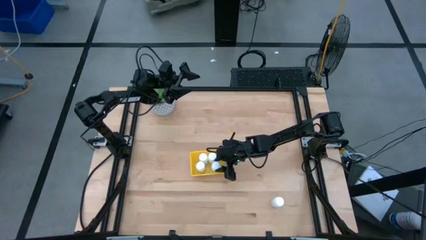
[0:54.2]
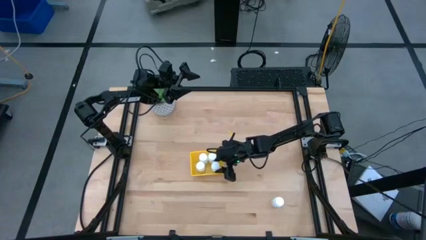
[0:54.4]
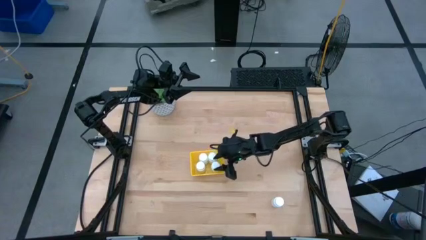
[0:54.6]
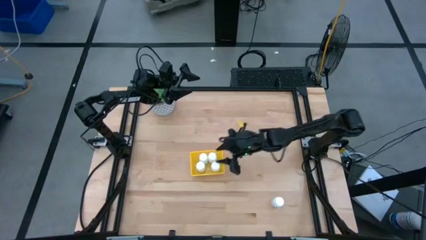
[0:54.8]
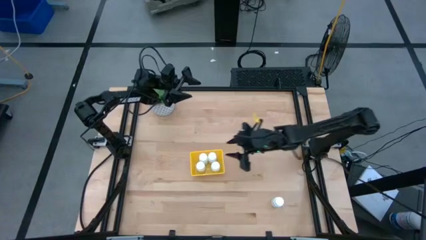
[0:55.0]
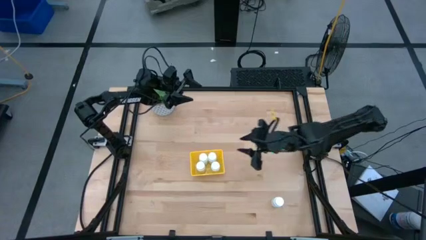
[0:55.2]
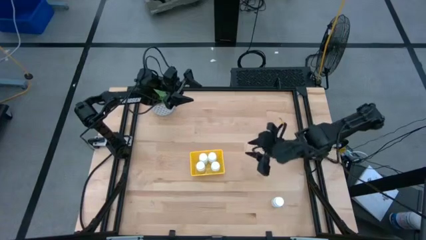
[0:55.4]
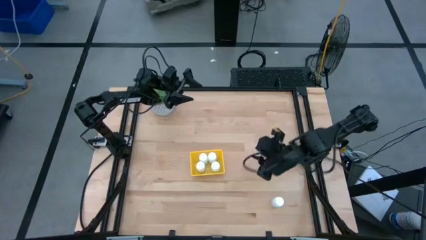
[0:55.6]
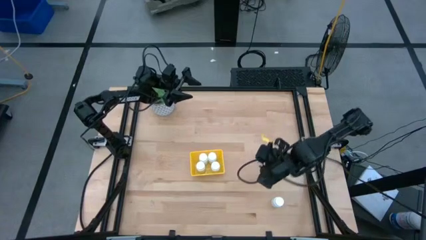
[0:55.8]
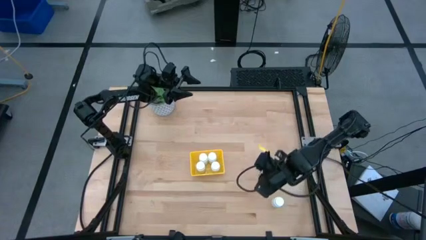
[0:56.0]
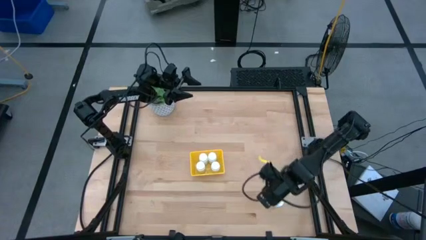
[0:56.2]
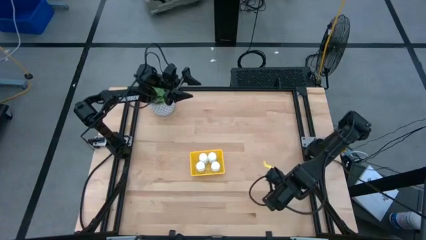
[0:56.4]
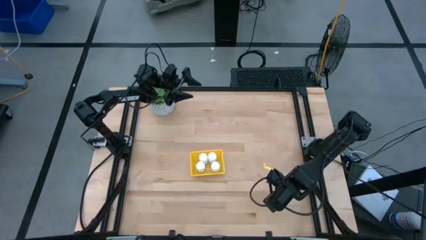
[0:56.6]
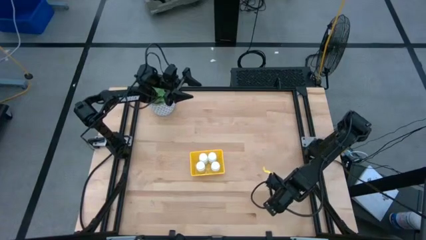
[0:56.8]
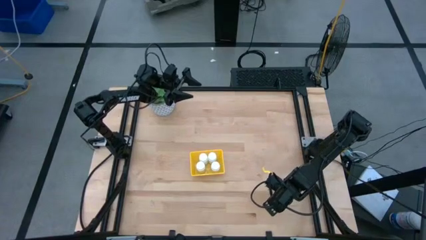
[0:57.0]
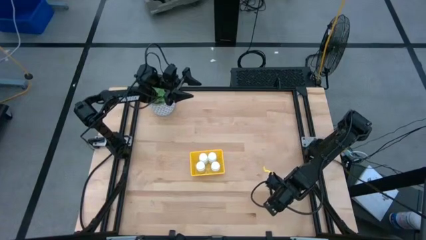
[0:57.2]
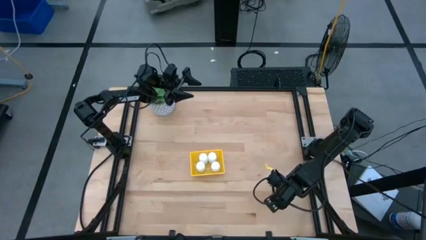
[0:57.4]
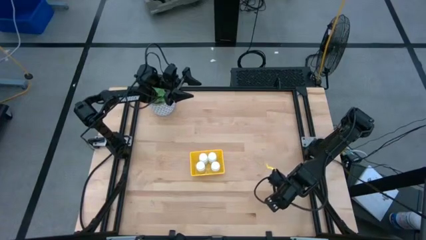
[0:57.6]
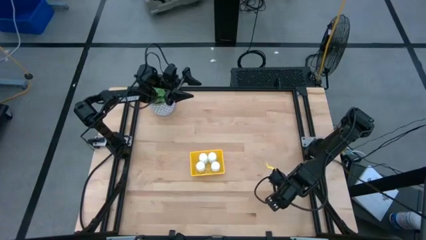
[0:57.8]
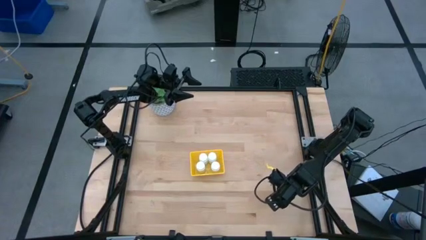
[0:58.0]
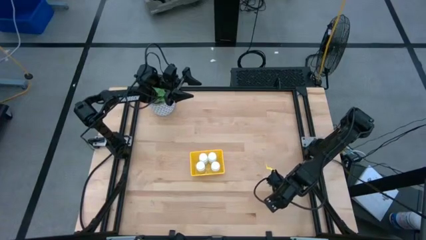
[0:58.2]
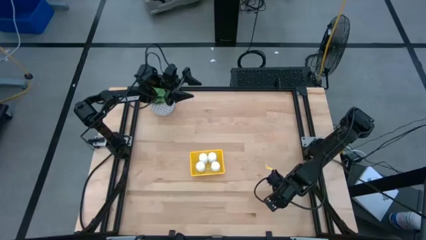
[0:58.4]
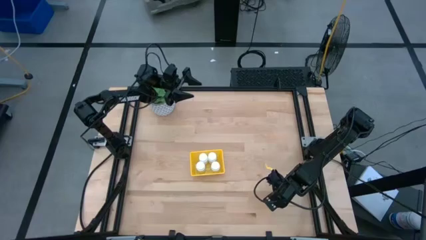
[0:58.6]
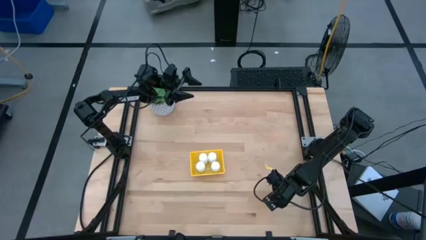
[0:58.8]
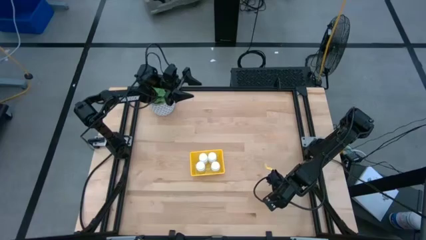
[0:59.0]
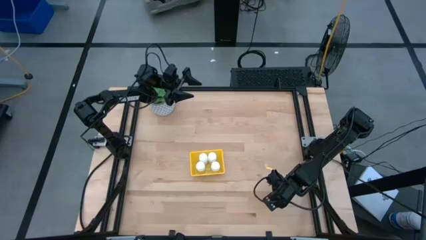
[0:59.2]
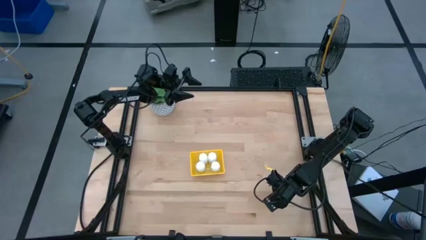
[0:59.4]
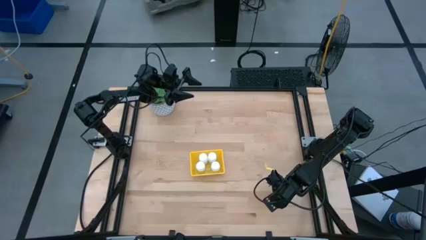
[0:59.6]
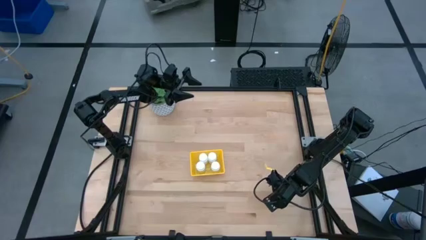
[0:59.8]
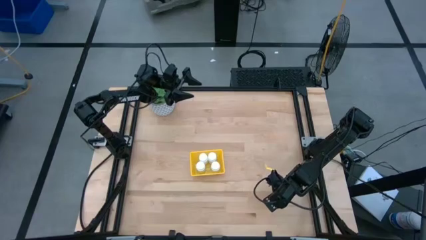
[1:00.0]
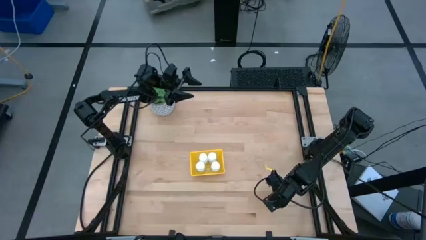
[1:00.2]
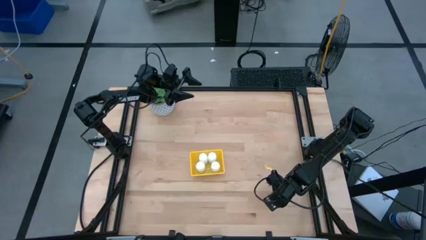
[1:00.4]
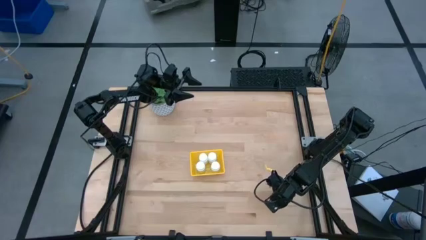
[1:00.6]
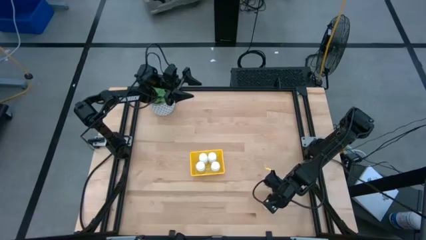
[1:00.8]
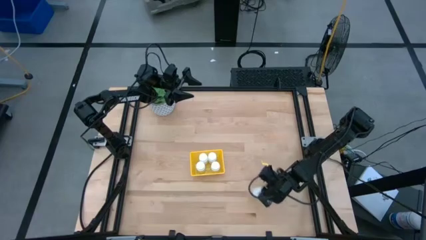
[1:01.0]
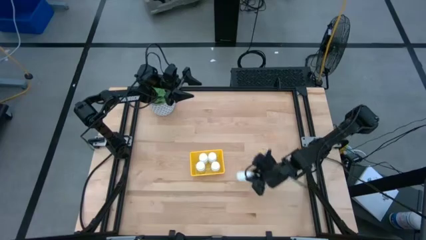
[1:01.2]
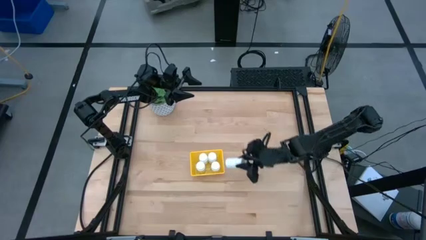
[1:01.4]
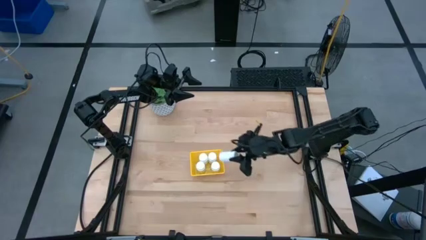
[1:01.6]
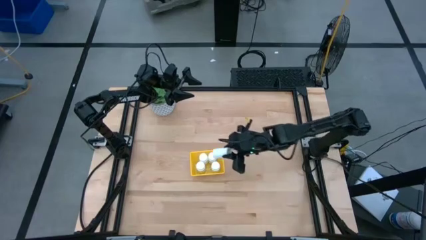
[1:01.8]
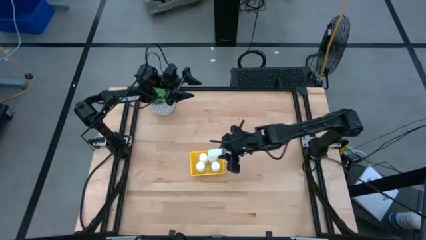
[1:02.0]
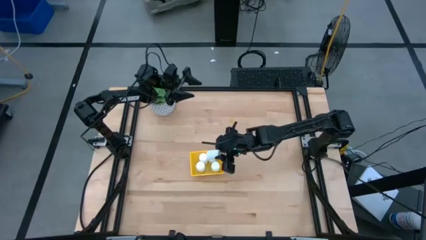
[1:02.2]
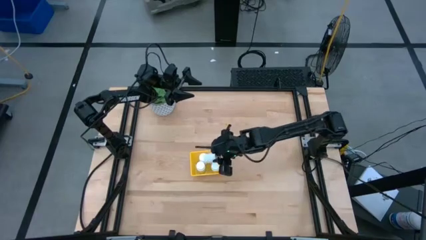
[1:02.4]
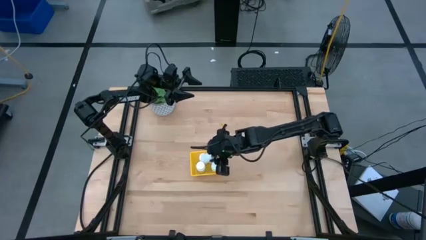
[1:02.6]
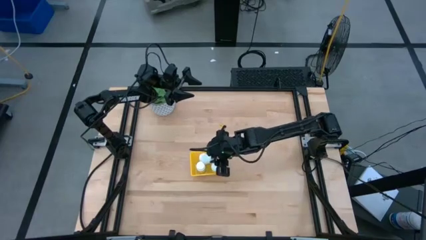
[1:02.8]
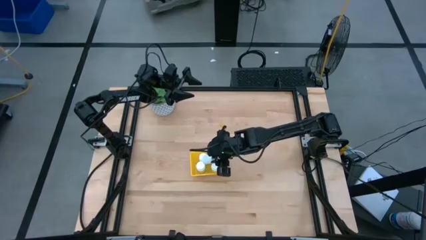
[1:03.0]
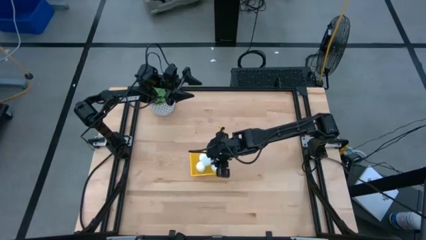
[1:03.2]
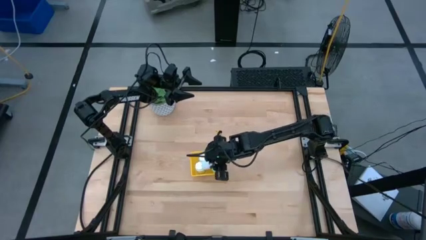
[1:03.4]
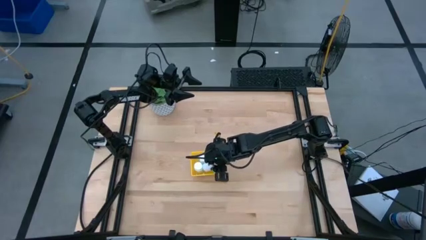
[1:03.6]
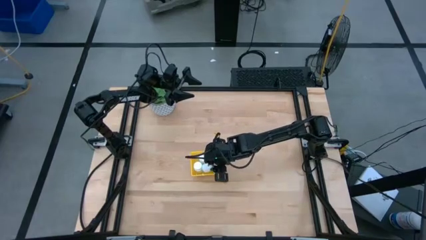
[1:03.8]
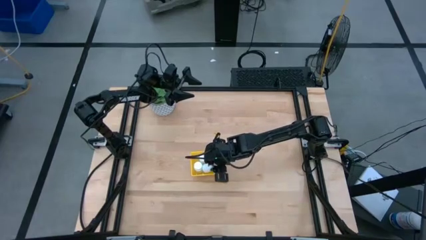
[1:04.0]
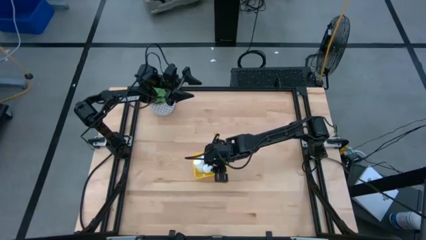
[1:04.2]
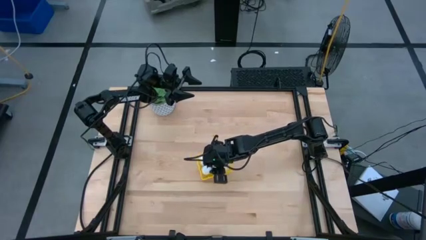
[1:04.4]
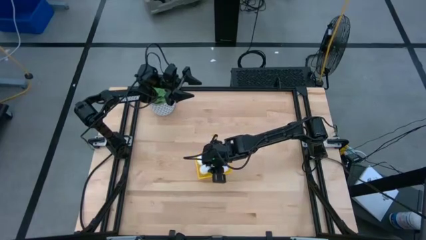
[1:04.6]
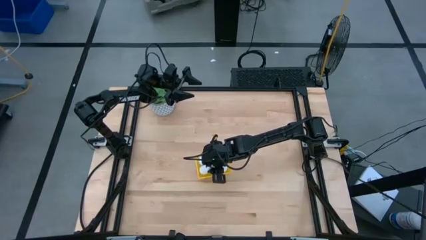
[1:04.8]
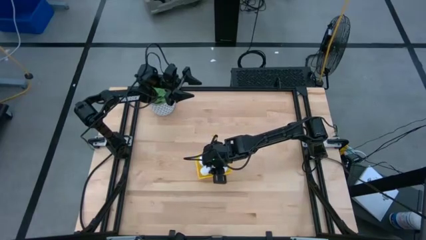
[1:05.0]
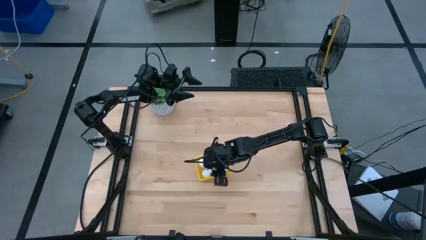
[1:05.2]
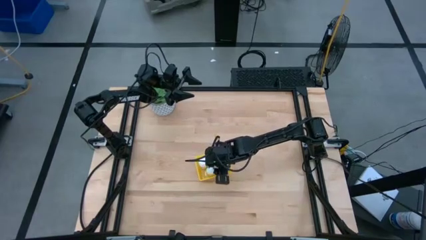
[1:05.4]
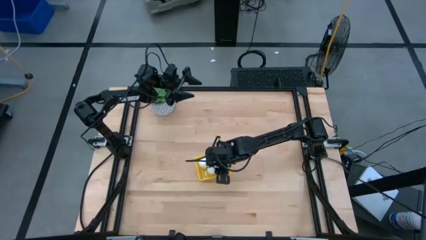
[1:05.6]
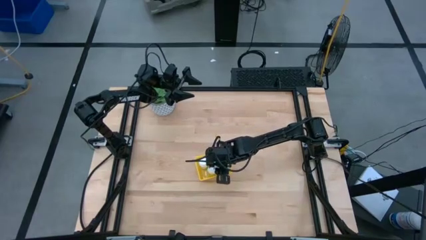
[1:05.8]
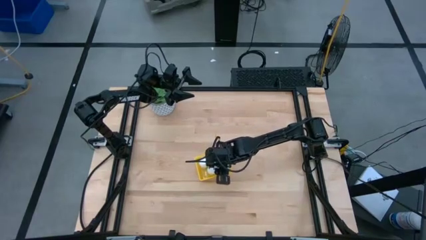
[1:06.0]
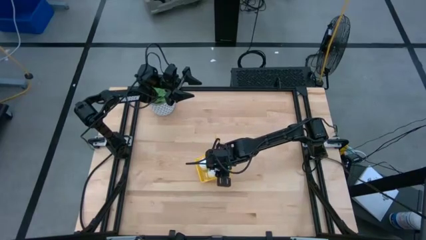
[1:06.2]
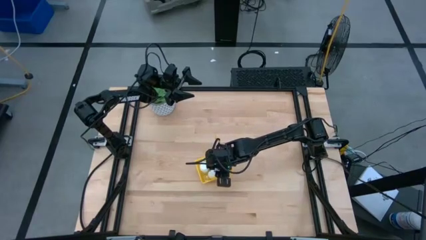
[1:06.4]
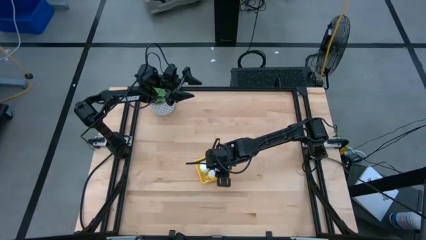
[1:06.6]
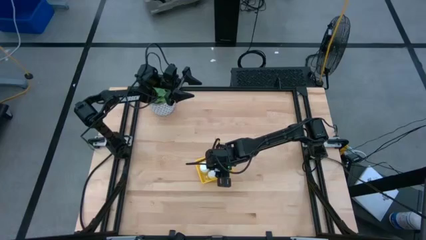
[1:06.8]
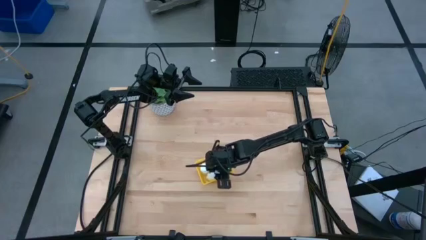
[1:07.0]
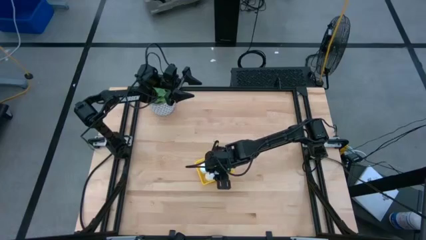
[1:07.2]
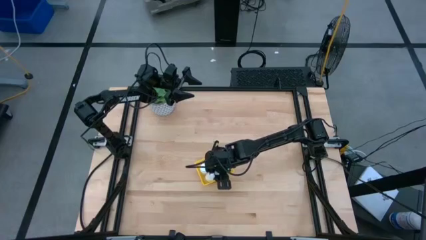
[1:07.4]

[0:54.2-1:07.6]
Task: Pick and place pill bottles into a basket
Put the white medicine bottle into the yellow bin
